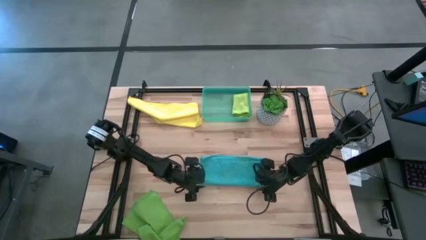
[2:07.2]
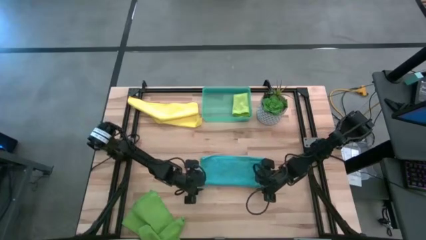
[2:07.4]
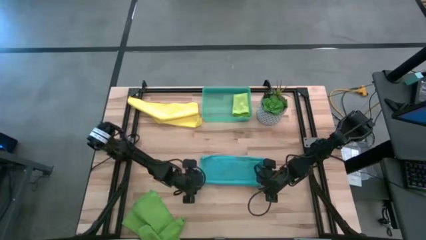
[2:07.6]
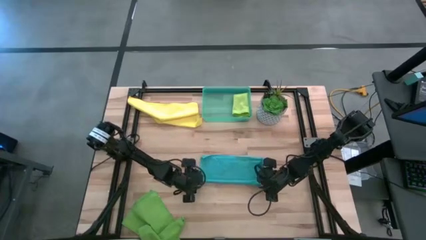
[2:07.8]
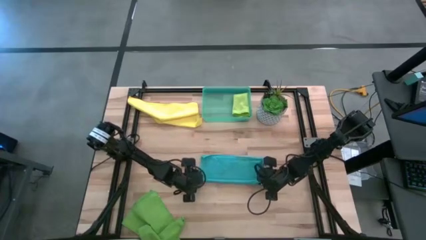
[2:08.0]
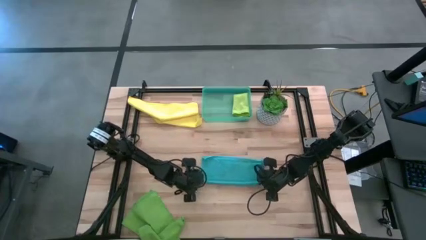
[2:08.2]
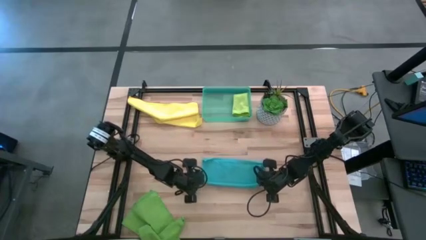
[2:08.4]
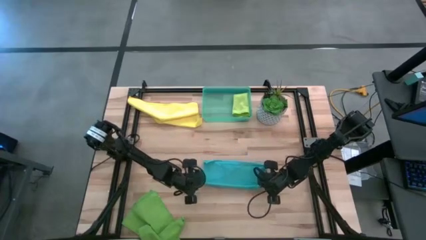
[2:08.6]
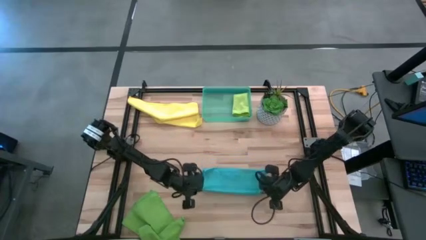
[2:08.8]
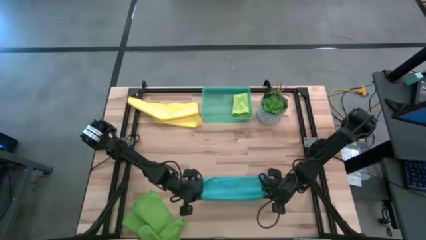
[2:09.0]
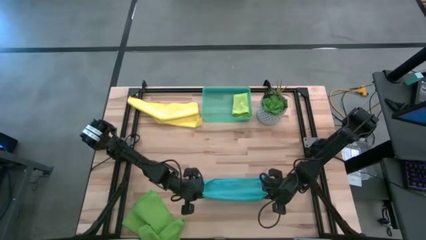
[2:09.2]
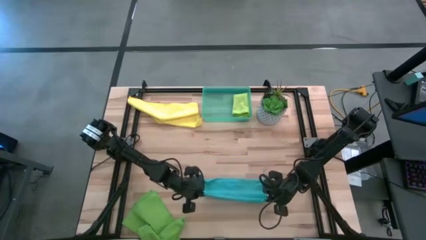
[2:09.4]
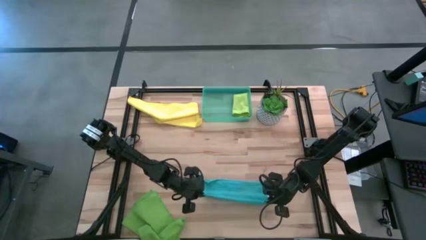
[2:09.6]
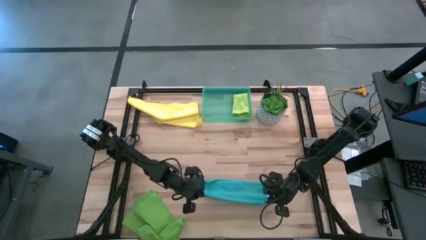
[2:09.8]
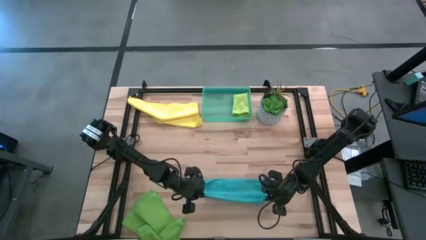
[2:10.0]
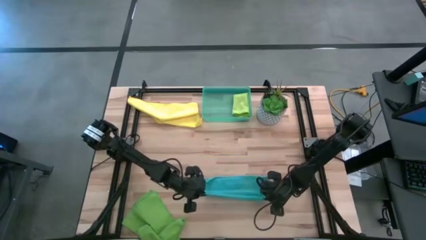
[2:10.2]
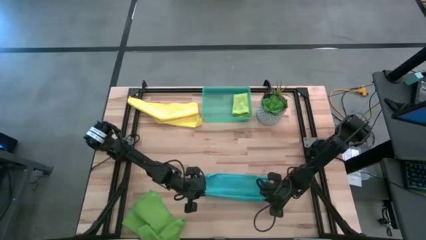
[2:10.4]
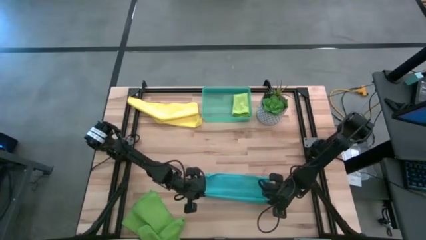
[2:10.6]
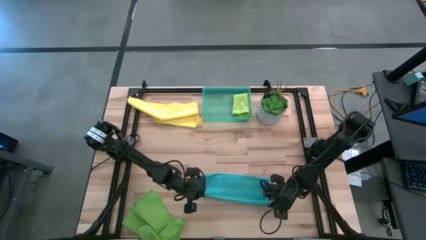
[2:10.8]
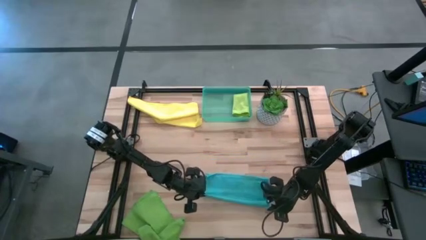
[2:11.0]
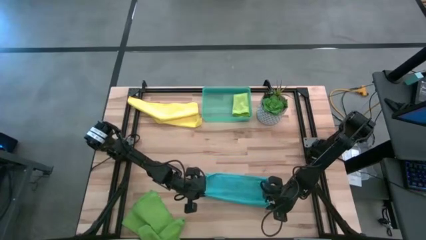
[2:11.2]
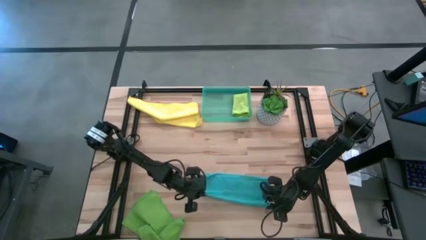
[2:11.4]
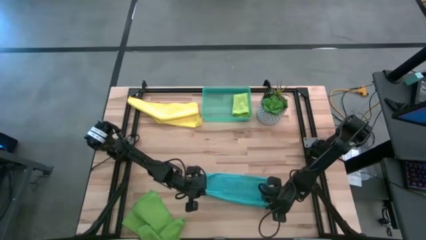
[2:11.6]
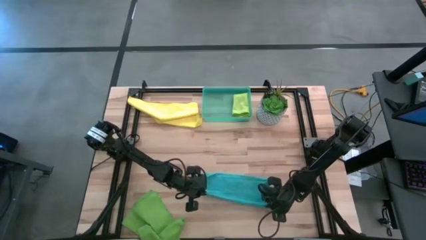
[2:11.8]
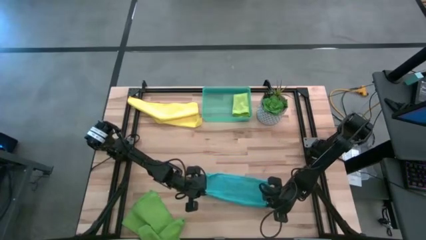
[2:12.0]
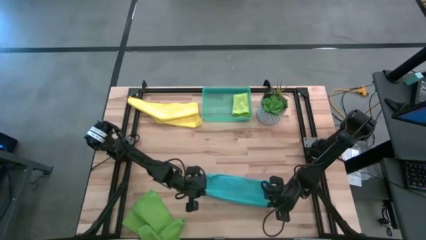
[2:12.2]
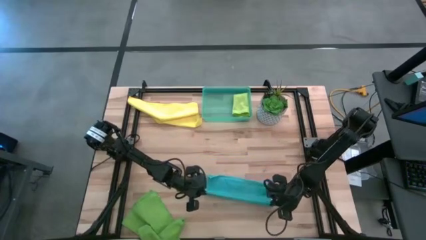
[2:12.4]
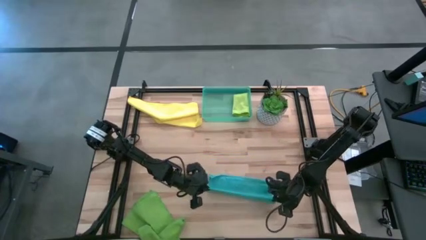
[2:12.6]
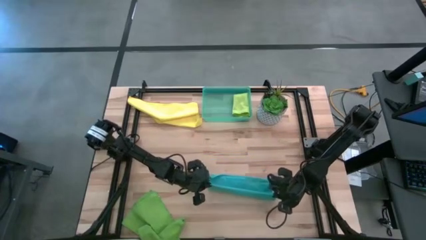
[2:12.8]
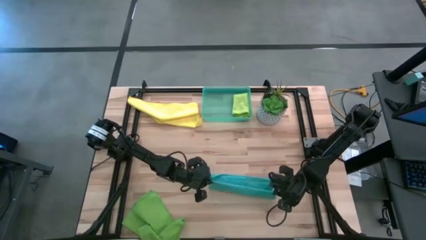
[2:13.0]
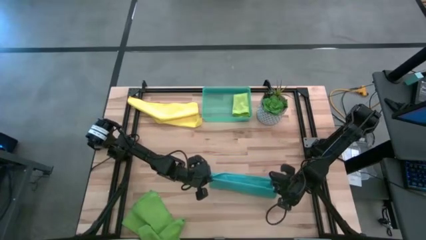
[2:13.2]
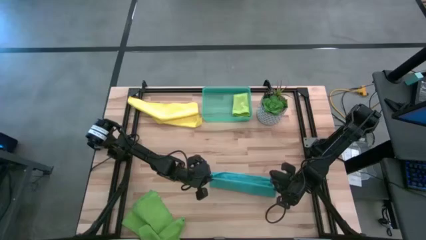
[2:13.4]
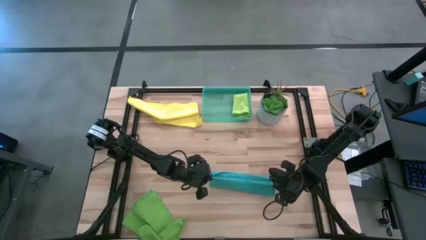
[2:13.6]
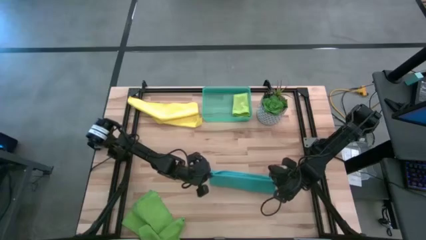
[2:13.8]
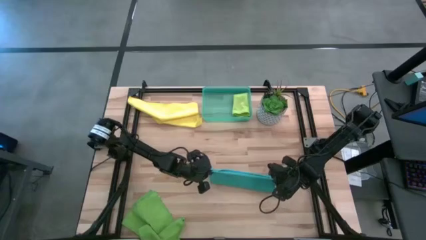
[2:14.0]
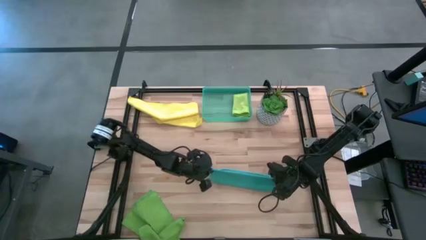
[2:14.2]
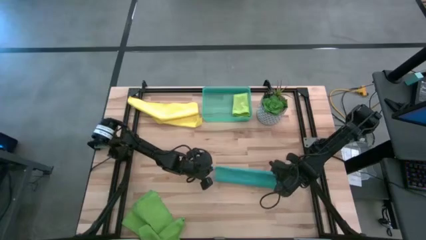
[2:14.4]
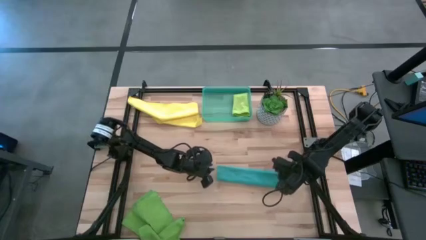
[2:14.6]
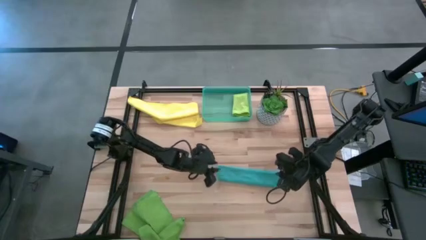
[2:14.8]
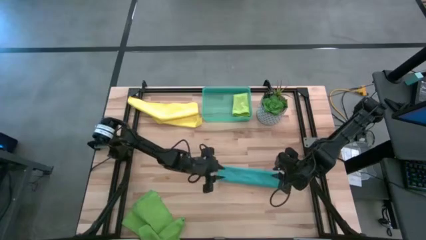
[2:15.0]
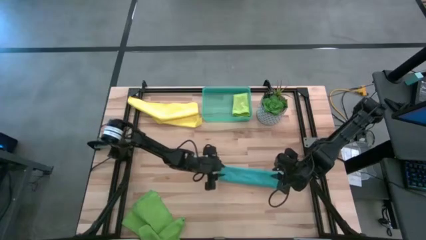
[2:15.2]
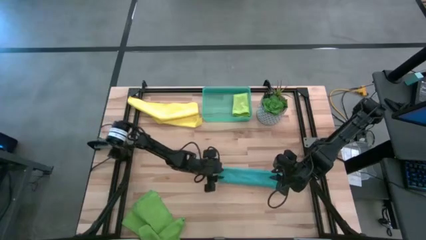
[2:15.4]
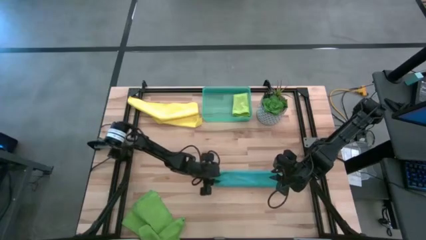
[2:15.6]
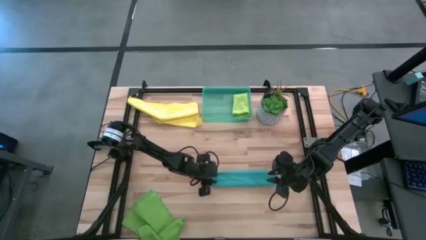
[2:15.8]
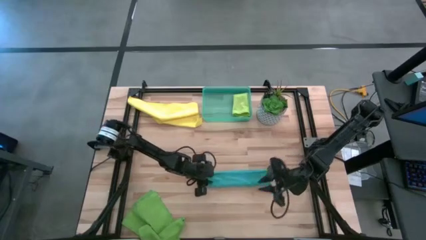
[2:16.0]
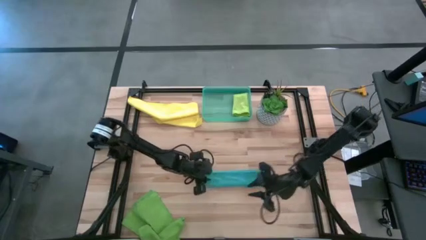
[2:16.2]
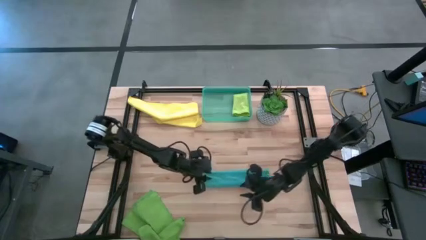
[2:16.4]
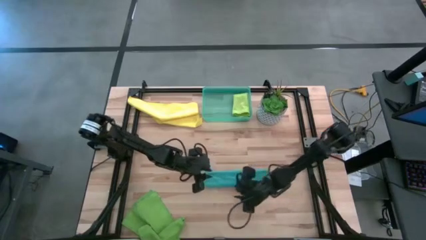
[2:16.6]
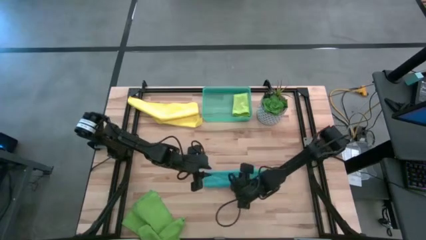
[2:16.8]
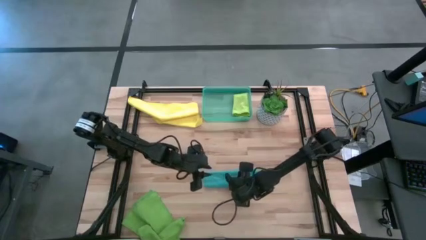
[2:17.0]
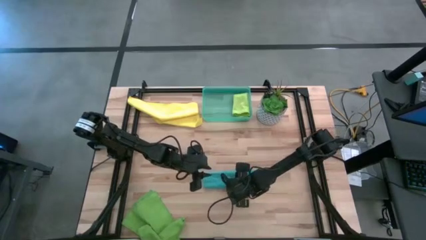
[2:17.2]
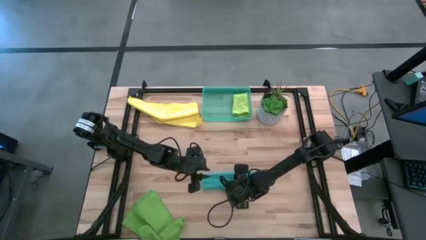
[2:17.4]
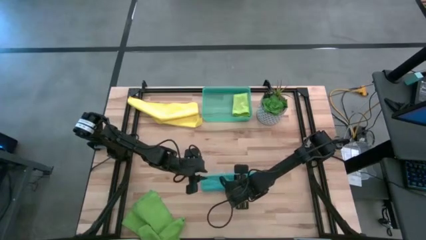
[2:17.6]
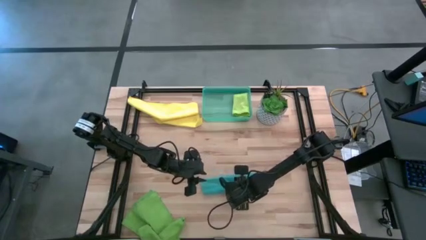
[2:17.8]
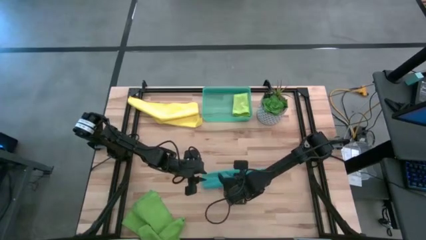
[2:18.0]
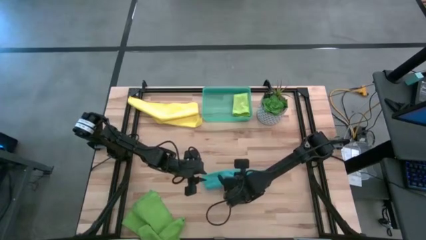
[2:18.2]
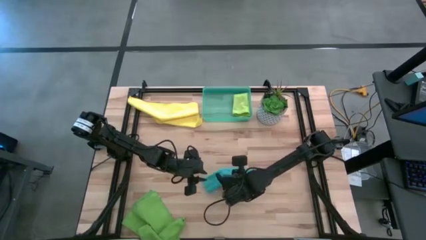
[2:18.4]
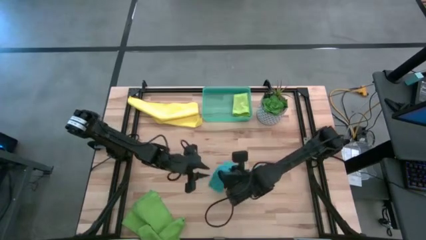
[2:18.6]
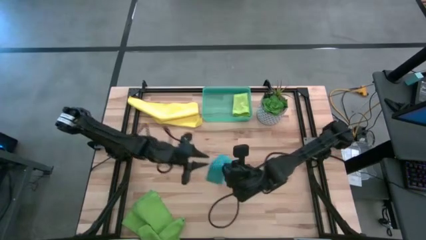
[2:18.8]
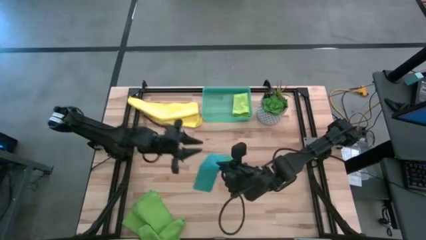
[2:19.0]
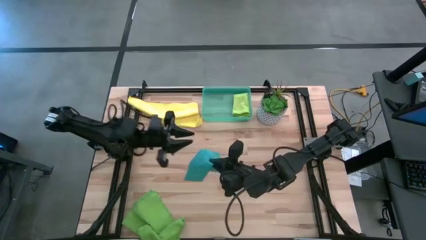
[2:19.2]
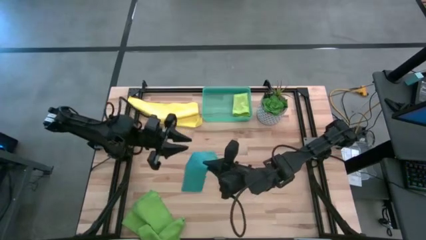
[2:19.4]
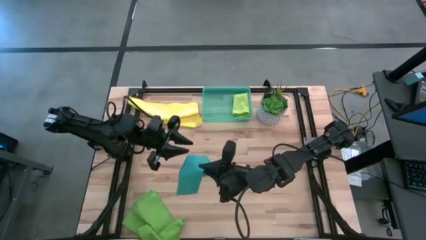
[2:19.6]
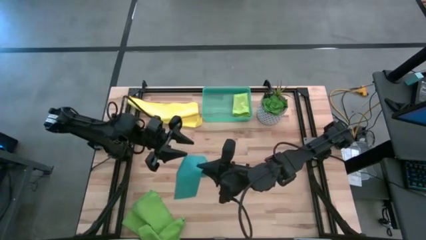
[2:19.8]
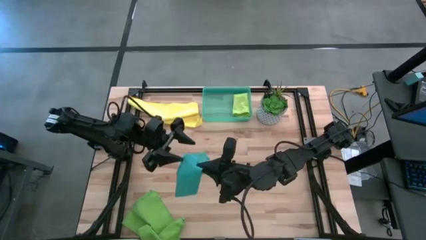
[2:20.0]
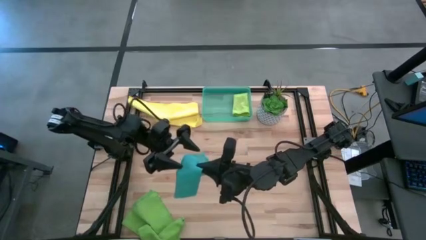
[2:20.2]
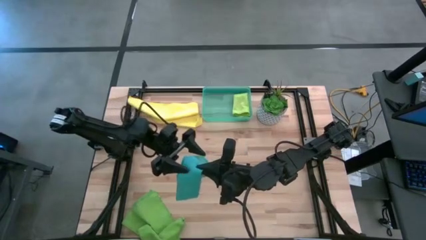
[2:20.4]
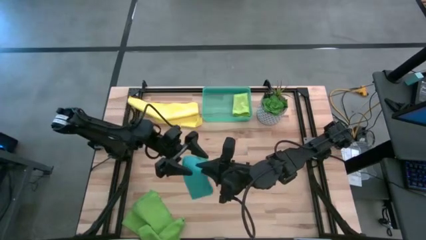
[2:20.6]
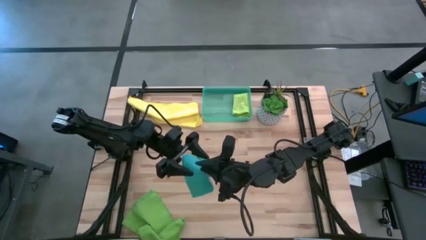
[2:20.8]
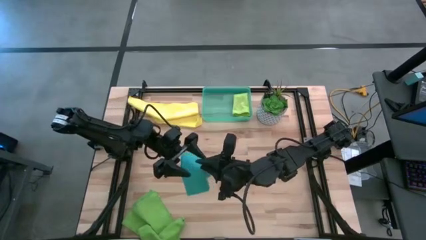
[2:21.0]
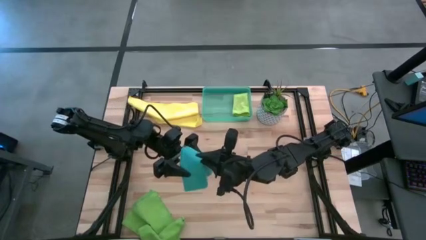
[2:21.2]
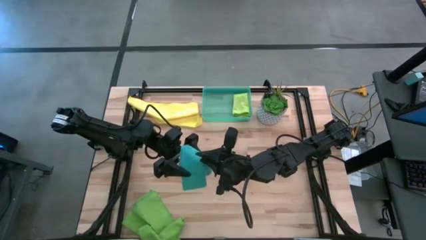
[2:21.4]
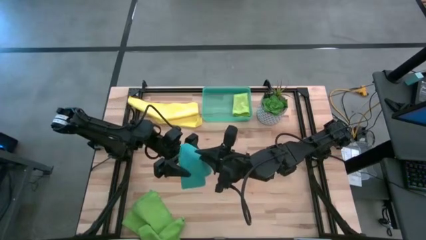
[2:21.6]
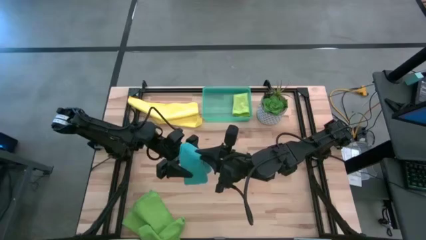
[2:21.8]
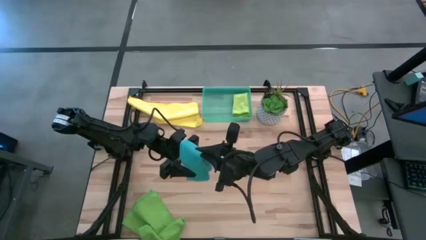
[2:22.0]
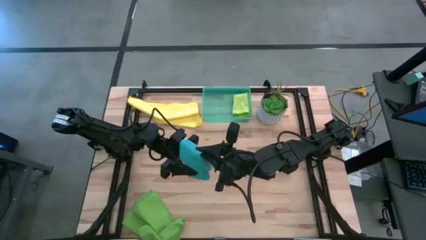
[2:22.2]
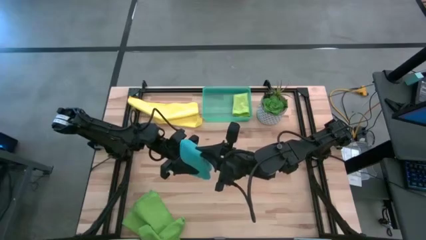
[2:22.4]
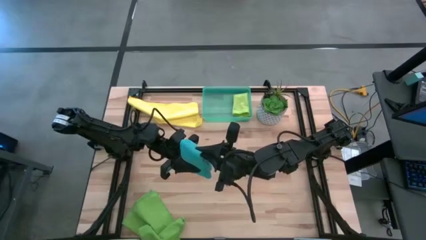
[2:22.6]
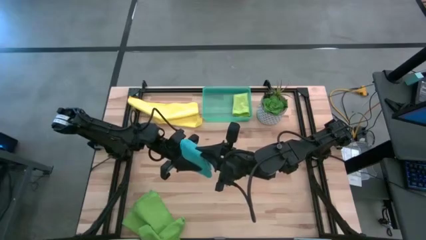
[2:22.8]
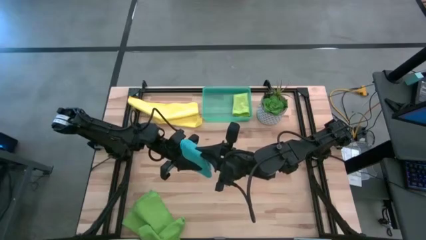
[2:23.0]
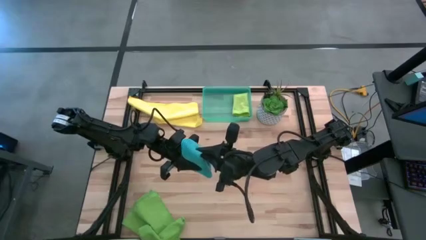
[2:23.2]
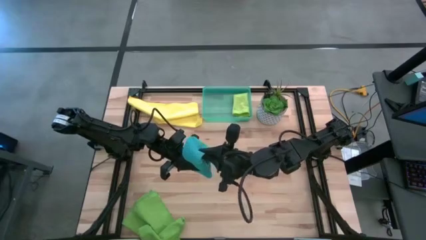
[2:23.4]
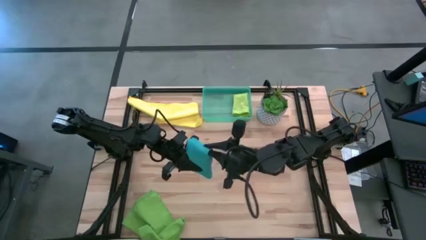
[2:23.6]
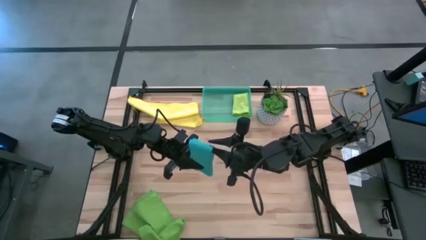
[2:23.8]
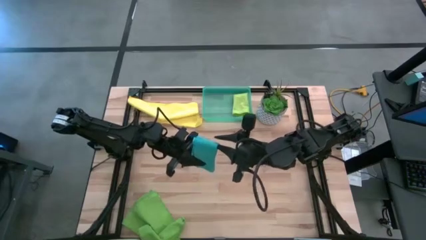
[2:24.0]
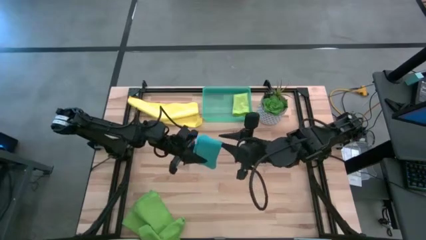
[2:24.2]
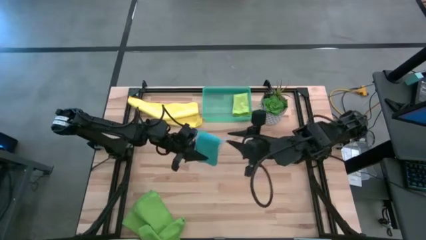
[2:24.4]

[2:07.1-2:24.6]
Task: Fold microfiber towels
Fold the blue microfiber cloth
